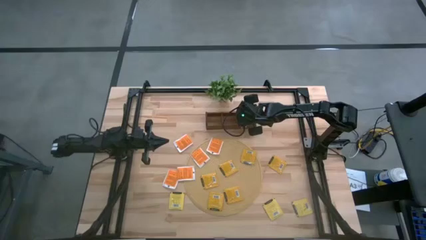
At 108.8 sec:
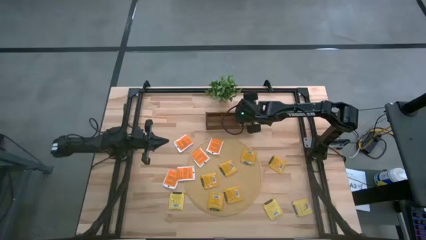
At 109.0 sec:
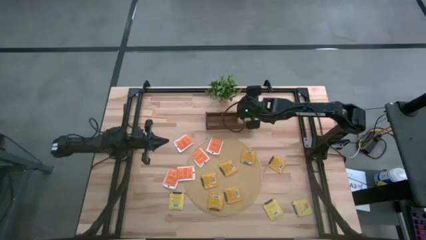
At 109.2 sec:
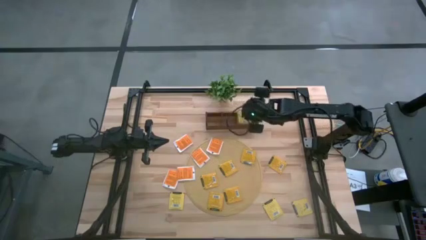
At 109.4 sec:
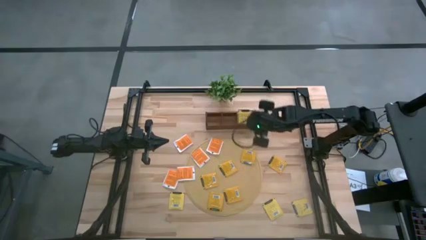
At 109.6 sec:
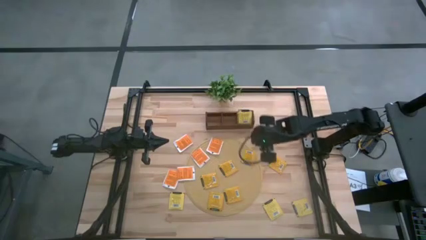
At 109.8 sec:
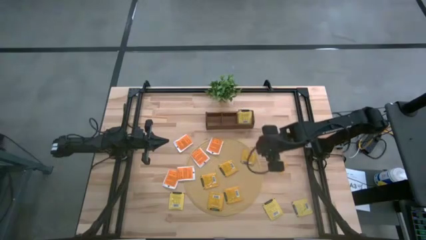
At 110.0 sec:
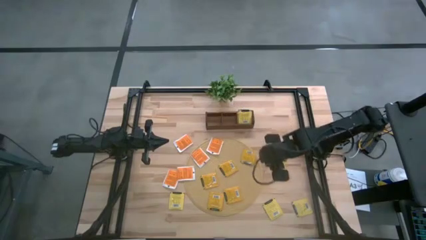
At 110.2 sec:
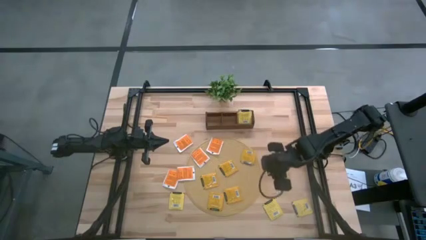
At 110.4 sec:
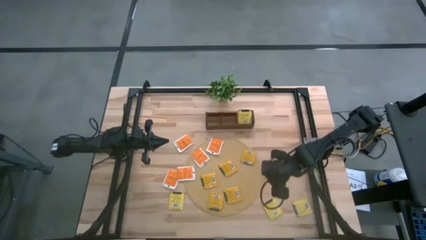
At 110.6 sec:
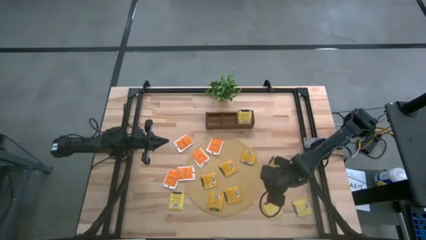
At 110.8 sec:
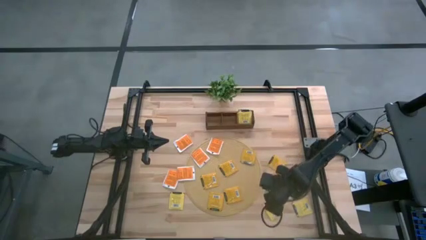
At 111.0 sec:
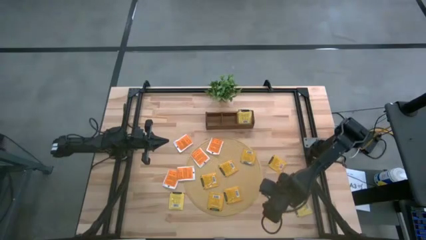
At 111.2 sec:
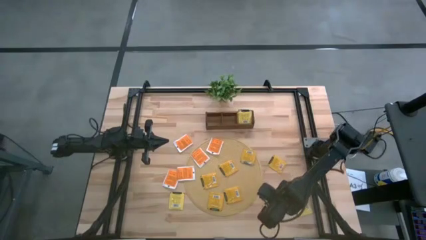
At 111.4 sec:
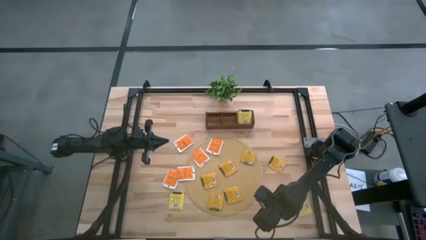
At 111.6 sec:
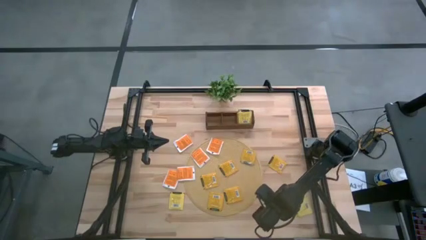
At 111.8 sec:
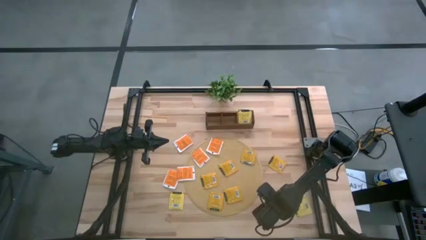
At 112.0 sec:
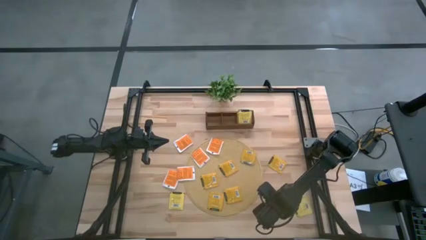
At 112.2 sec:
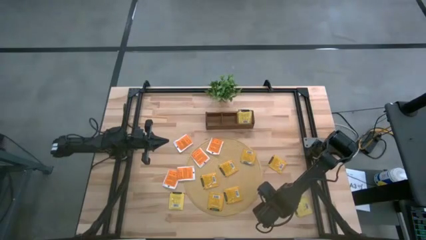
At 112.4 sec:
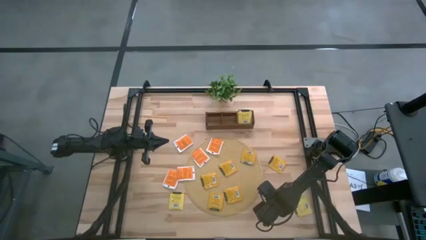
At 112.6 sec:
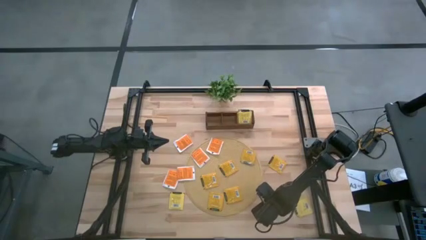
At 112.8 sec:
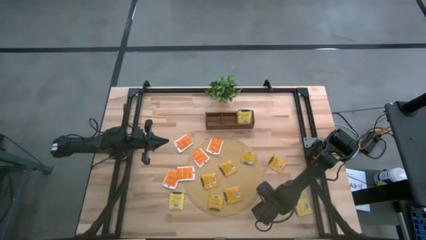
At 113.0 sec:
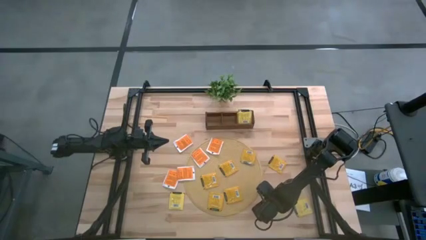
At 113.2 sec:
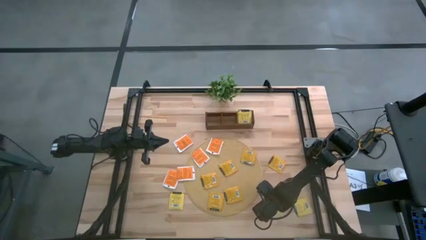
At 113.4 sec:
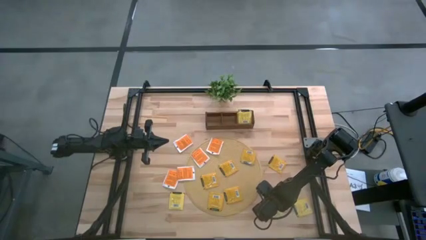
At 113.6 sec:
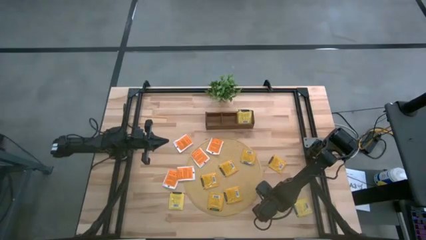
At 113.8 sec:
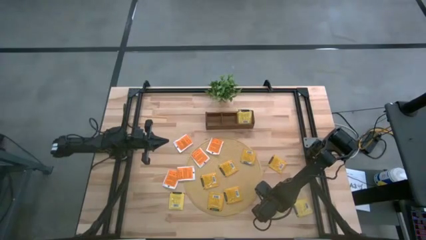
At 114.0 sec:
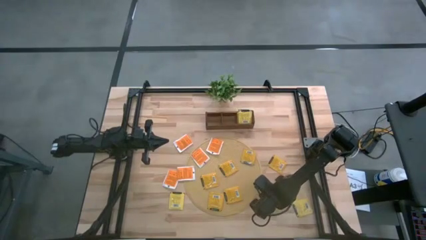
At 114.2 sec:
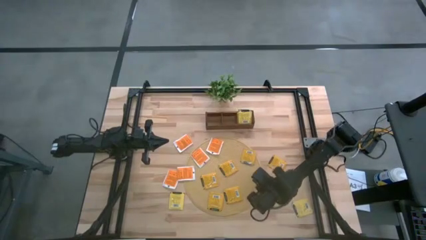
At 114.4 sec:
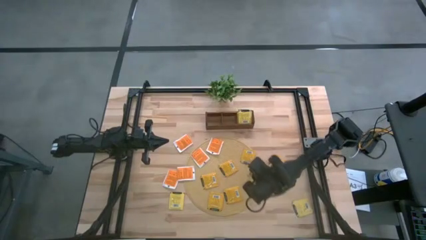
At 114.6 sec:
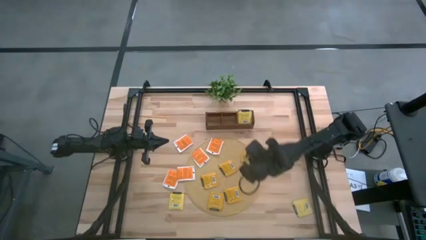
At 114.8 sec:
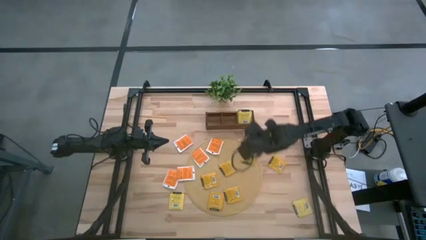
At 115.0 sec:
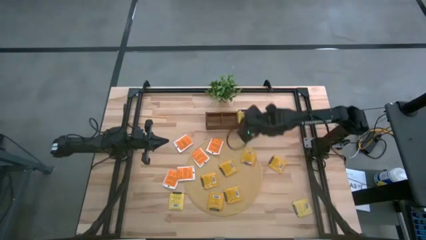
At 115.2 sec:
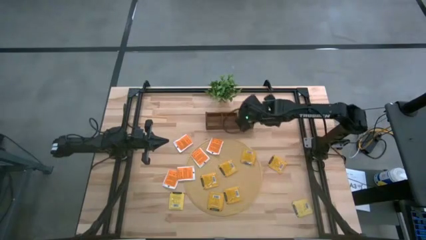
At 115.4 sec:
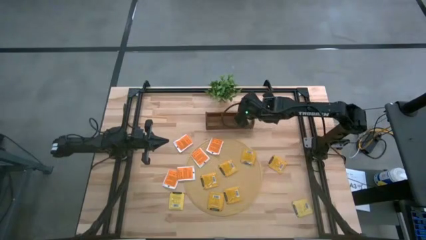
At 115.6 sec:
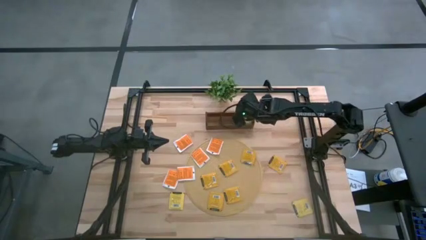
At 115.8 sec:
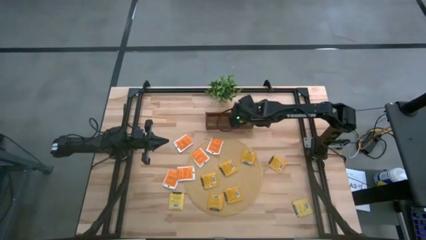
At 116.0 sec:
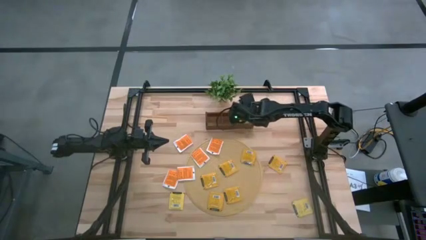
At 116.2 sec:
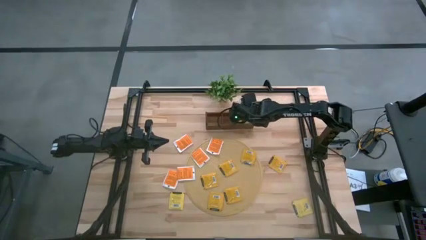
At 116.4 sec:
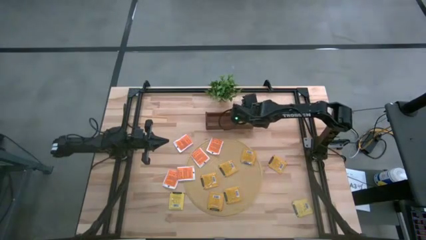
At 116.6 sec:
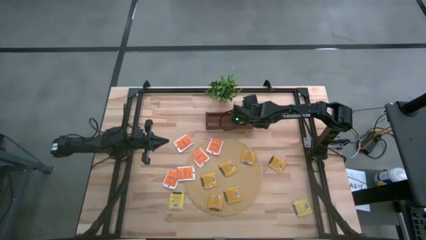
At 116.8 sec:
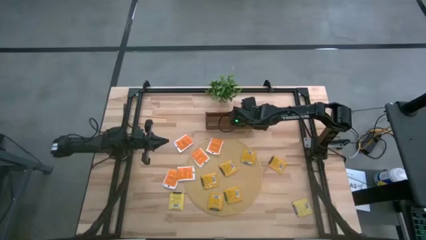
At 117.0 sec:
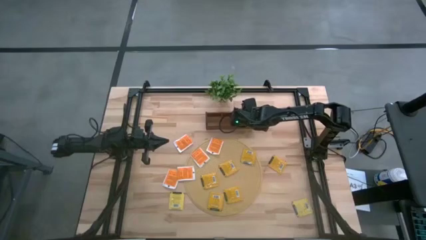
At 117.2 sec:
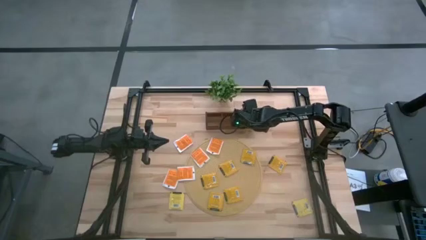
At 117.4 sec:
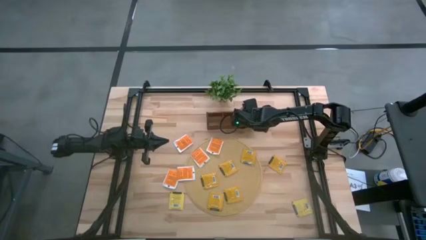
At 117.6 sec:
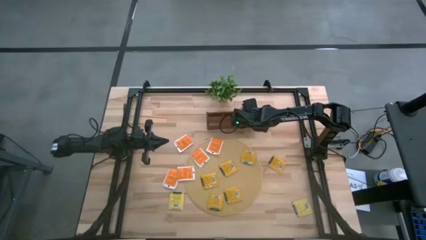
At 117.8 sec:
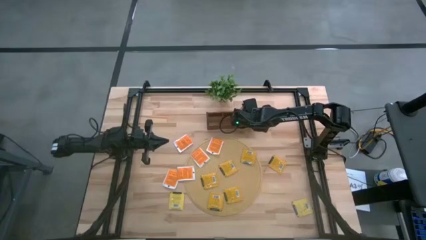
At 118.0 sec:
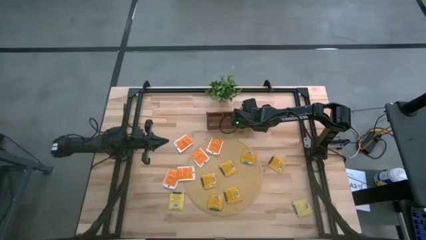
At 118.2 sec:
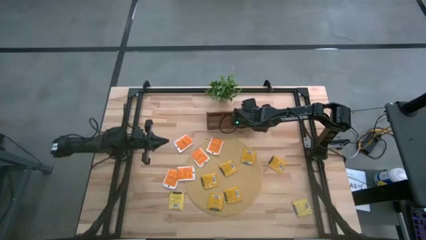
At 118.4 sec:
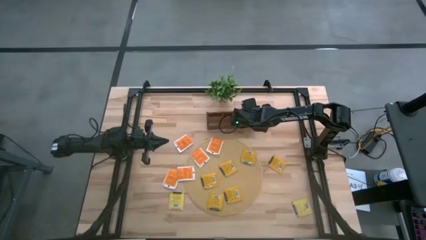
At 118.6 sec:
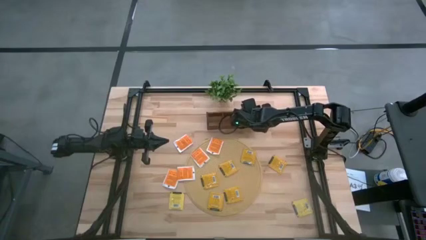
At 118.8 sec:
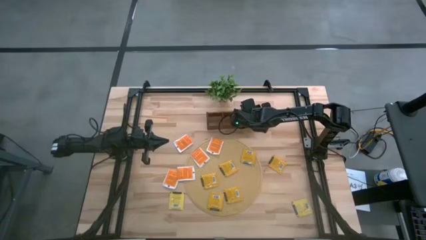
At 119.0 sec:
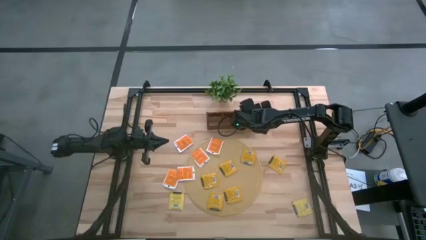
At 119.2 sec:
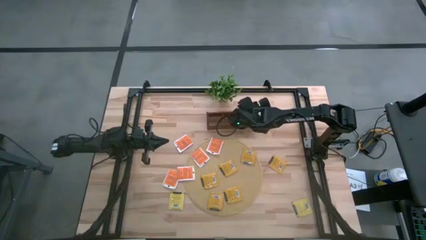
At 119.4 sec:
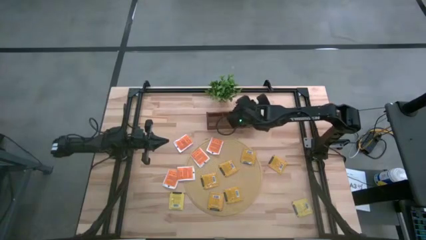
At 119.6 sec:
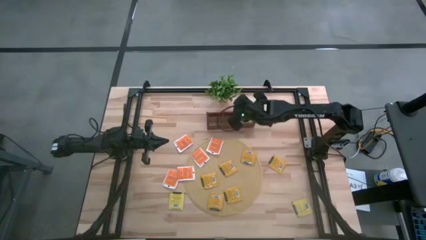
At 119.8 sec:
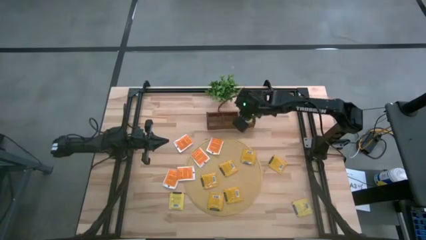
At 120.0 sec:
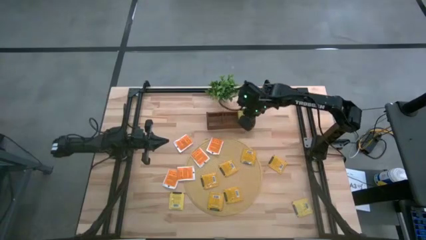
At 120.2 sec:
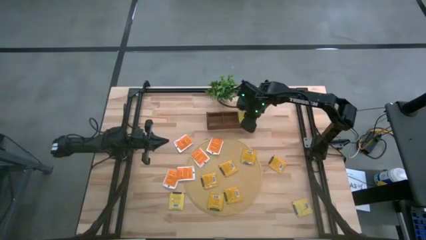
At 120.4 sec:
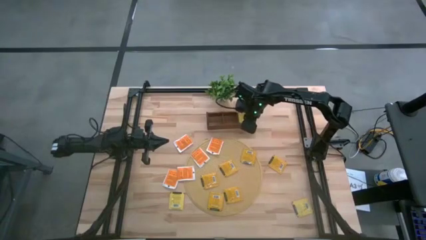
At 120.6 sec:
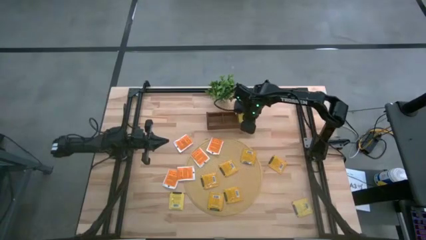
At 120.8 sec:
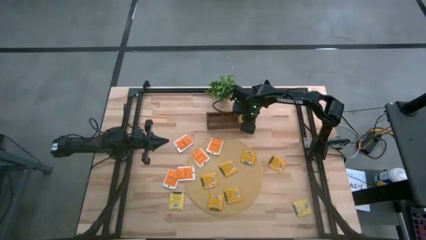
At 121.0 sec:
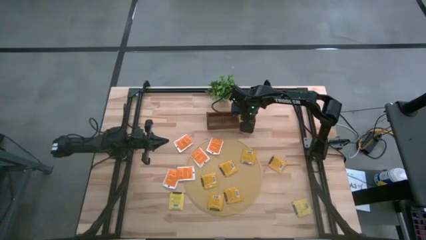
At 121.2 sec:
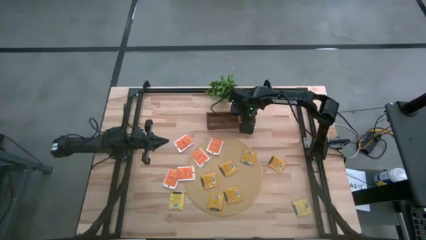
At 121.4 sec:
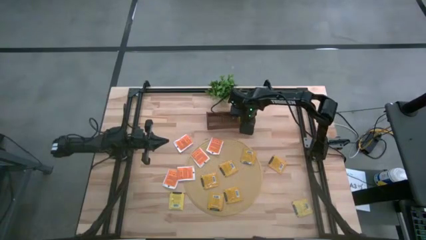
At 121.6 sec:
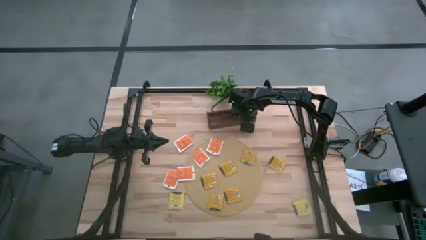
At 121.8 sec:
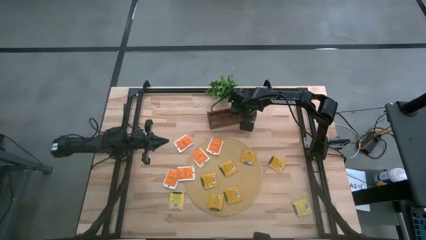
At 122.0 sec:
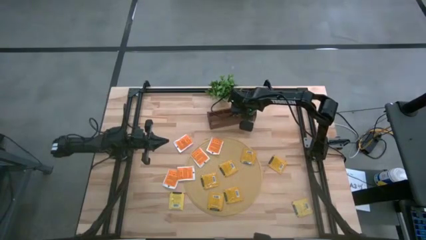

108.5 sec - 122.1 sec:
Task: Pick & Place Tea
Put the yellow tea bag into the right section of the wooden organizer

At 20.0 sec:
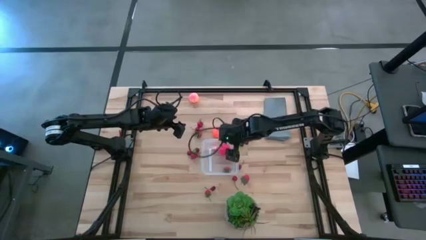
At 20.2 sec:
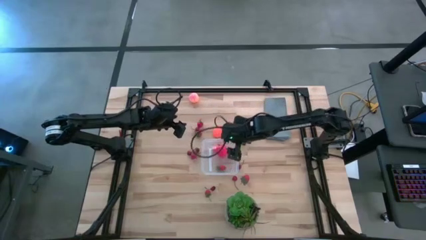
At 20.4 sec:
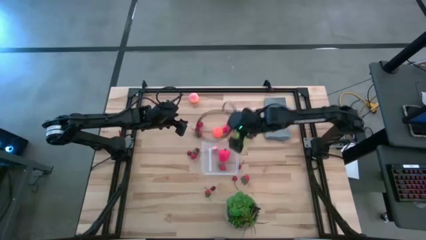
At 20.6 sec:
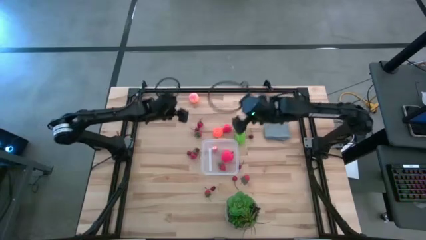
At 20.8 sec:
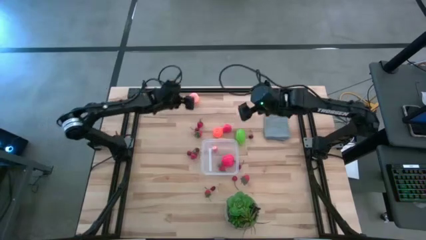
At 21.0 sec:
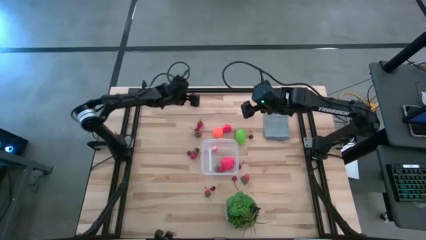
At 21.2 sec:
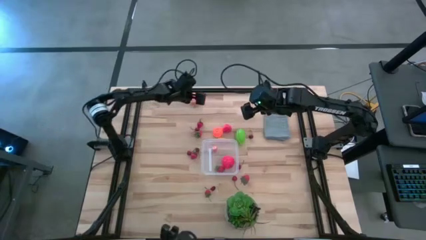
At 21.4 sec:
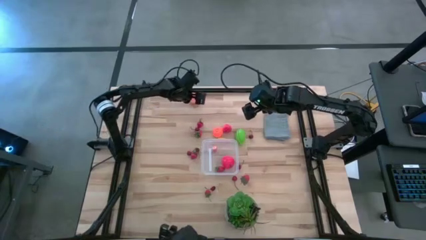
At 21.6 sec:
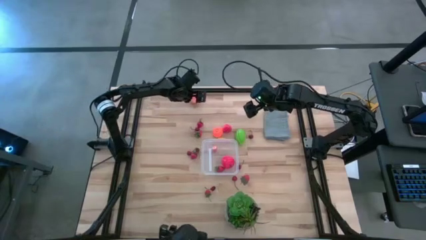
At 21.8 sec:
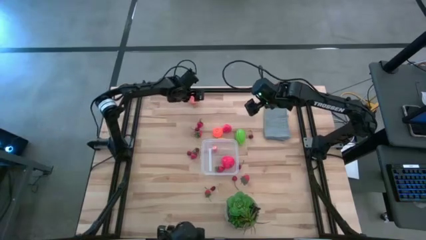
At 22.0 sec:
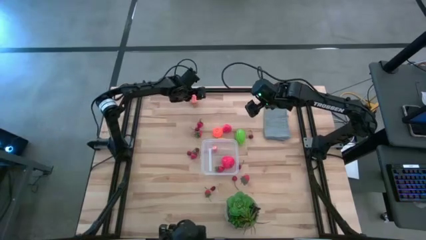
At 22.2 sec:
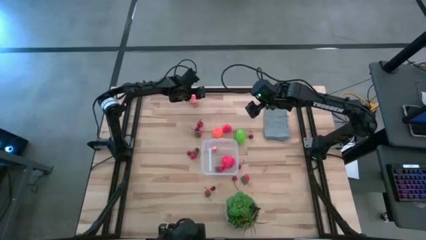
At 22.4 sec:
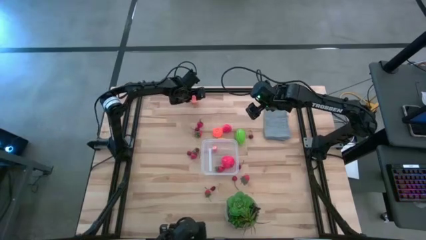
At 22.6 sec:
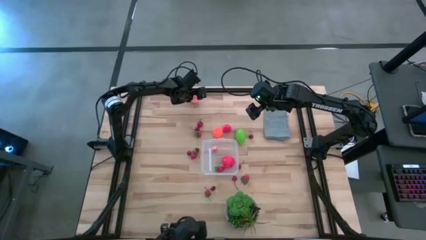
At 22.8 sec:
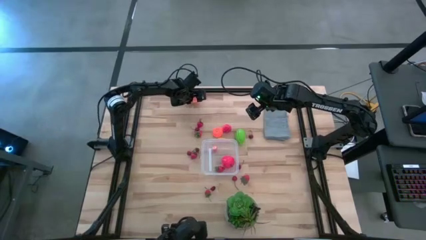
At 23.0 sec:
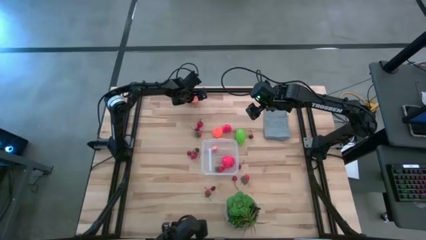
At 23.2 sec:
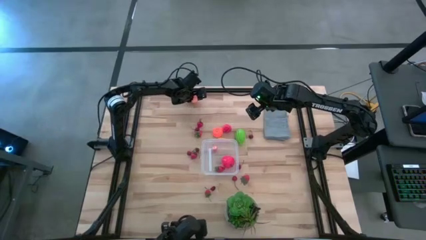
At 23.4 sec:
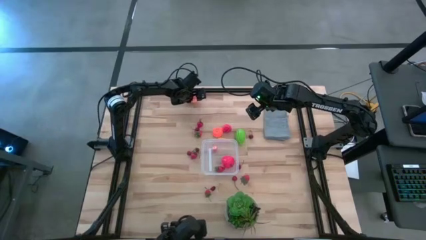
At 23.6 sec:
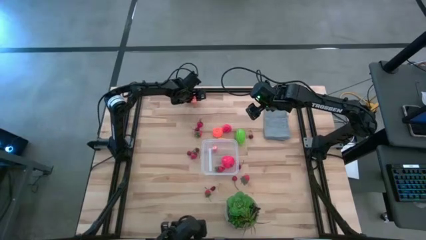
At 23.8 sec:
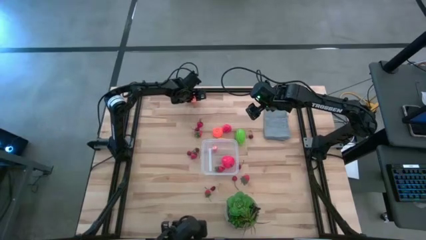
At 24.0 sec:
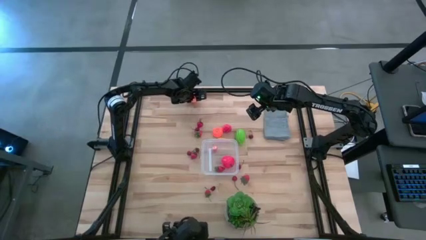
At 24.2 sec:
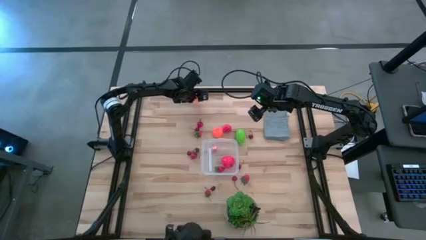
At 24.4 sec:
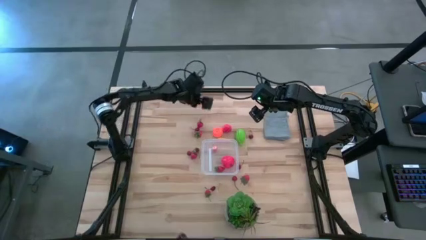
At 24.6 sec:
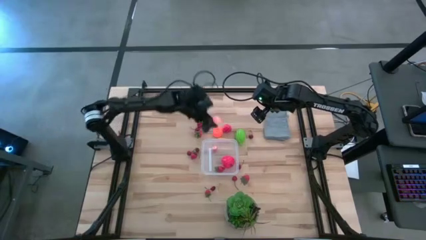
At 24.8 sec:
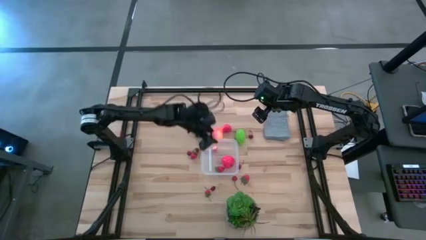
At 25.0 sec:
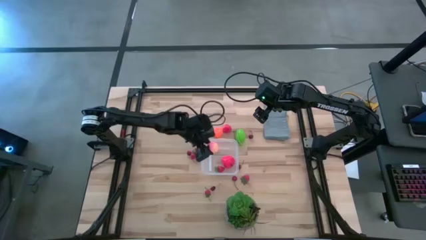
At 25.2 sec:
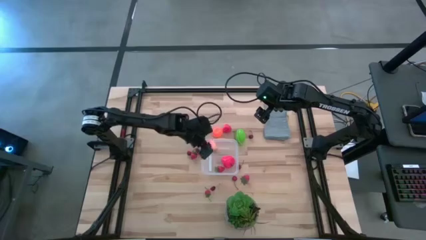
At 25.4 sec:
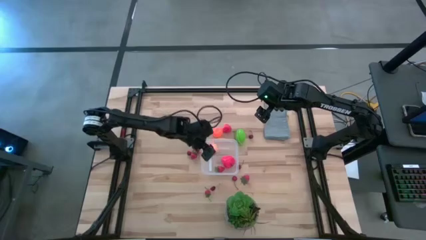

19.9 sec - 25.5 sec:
Task: Pick and placing Produce into tupperware
Put the pink peach into the transparent container
